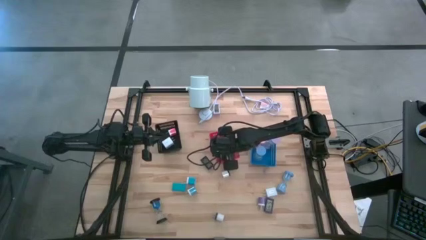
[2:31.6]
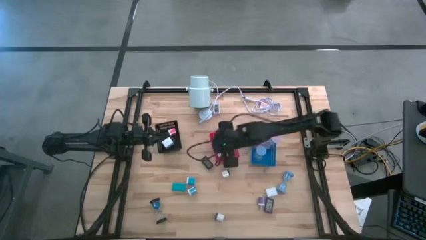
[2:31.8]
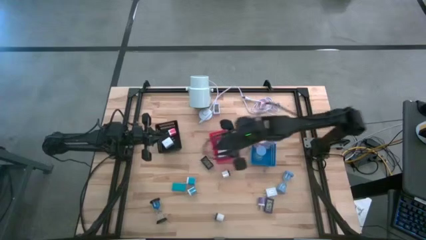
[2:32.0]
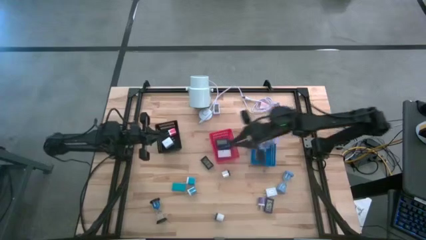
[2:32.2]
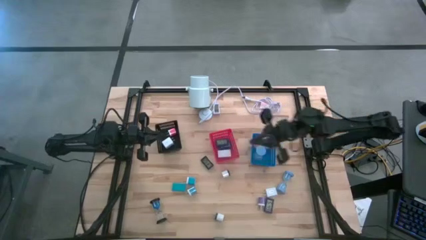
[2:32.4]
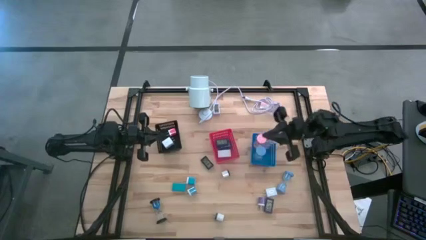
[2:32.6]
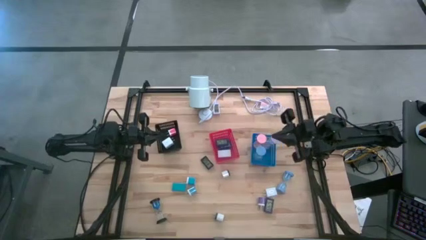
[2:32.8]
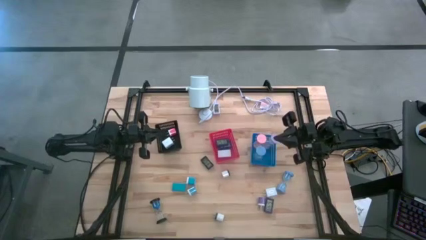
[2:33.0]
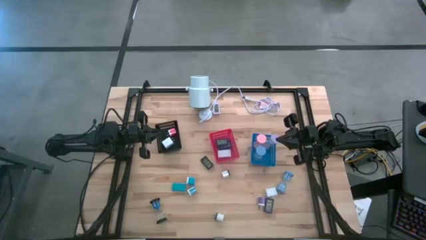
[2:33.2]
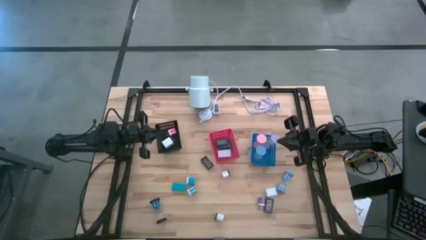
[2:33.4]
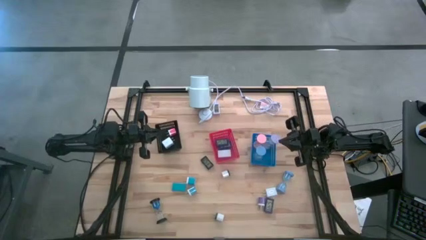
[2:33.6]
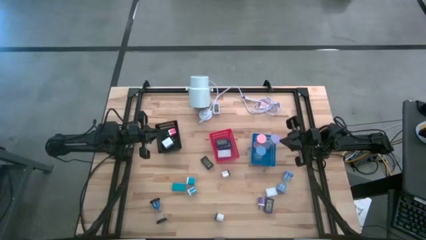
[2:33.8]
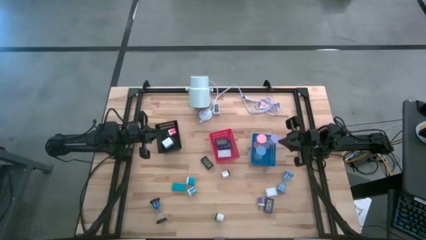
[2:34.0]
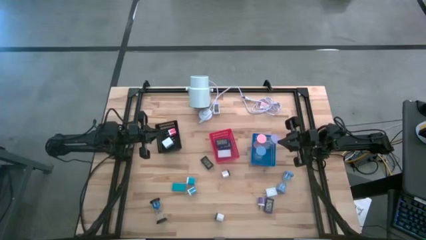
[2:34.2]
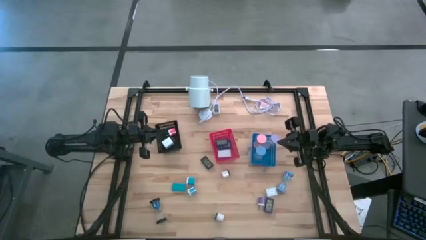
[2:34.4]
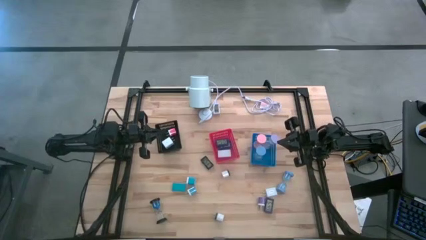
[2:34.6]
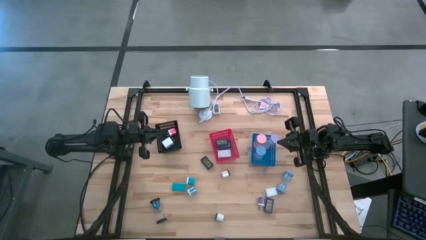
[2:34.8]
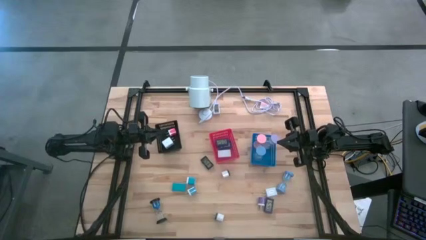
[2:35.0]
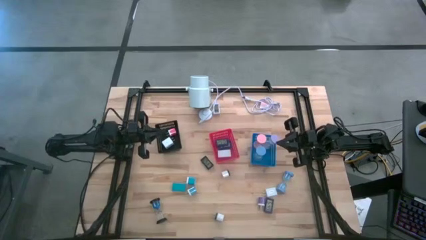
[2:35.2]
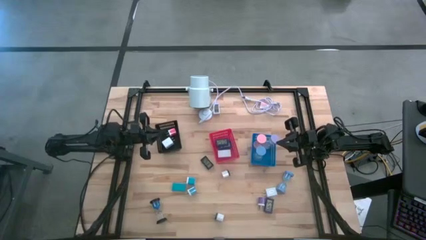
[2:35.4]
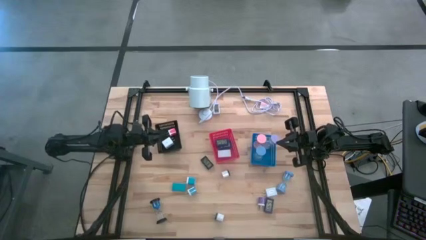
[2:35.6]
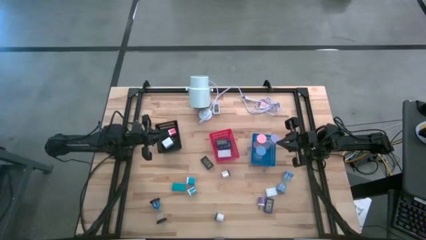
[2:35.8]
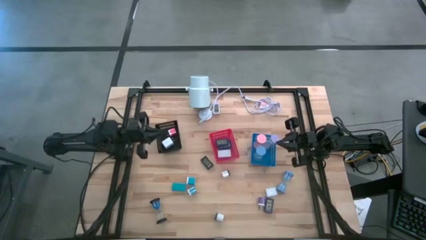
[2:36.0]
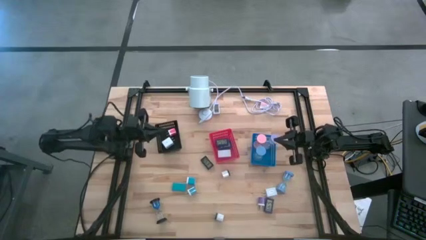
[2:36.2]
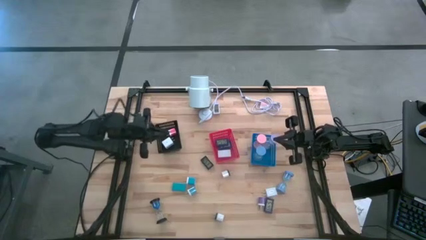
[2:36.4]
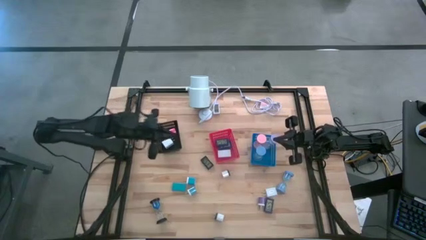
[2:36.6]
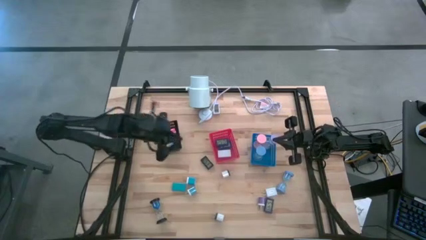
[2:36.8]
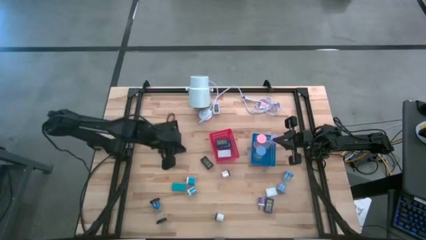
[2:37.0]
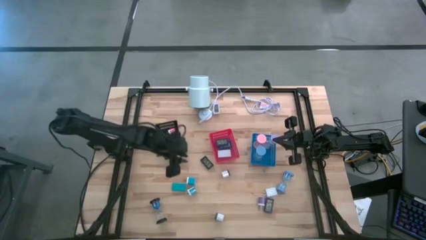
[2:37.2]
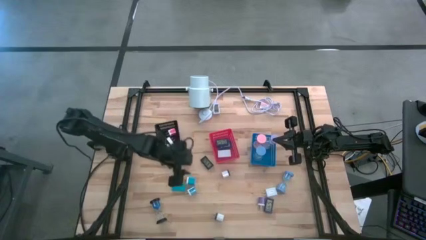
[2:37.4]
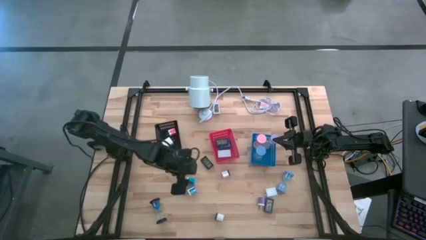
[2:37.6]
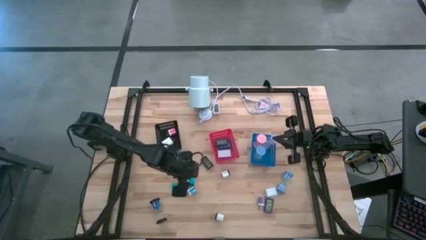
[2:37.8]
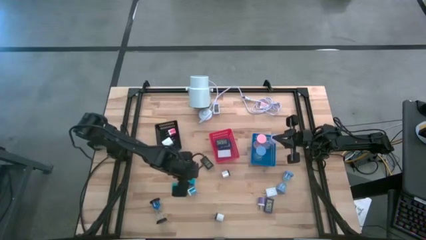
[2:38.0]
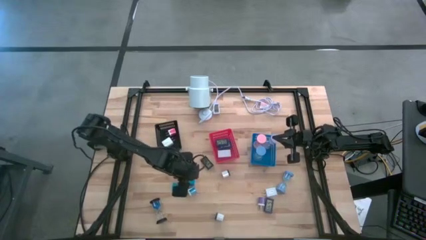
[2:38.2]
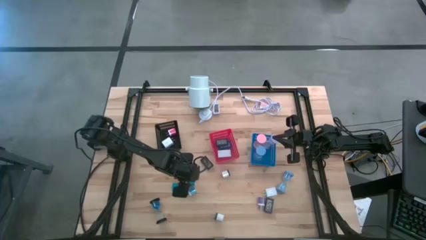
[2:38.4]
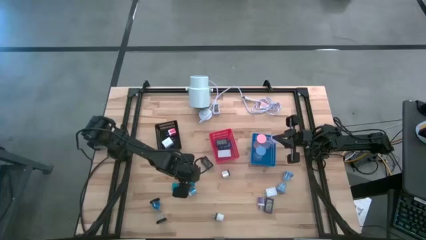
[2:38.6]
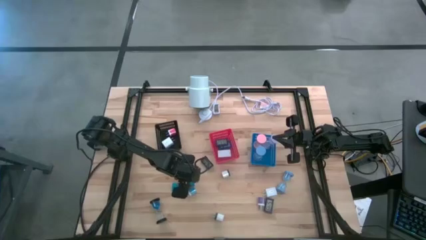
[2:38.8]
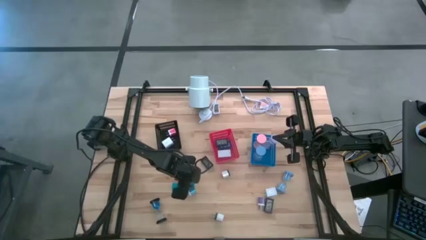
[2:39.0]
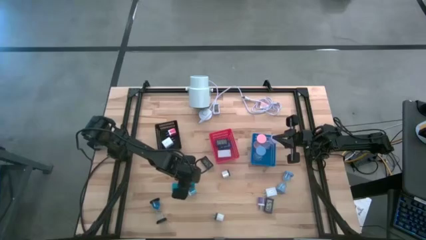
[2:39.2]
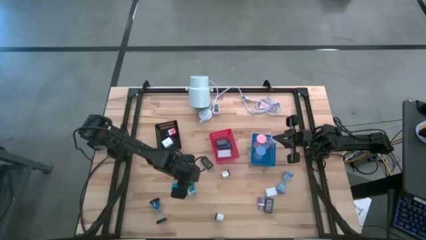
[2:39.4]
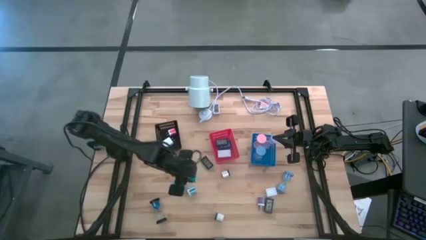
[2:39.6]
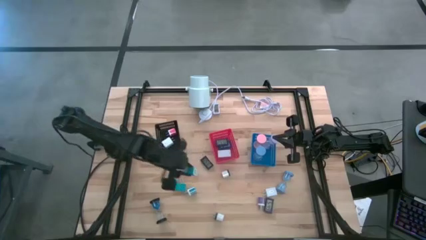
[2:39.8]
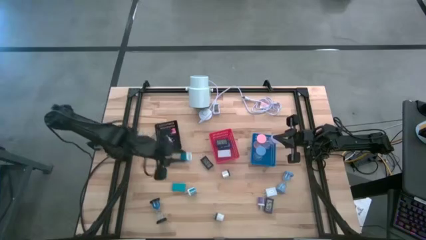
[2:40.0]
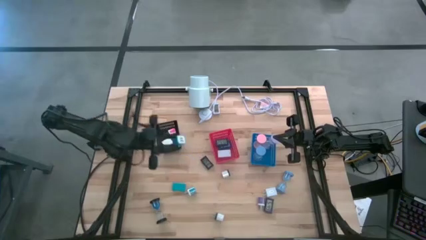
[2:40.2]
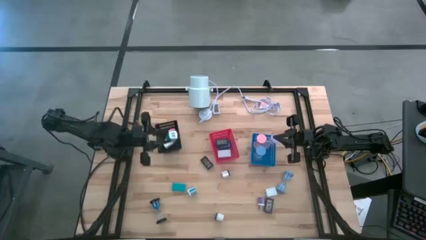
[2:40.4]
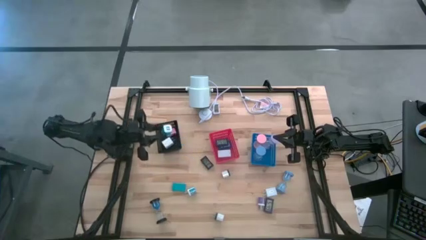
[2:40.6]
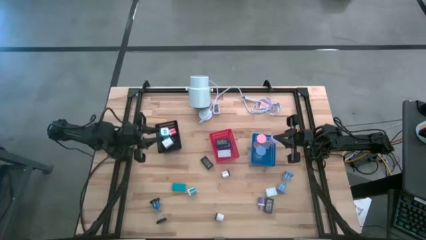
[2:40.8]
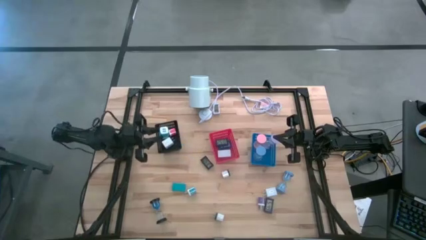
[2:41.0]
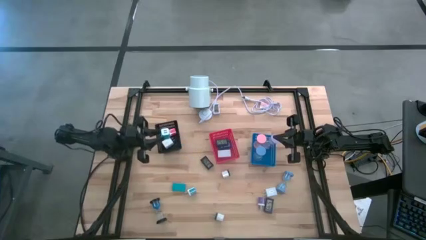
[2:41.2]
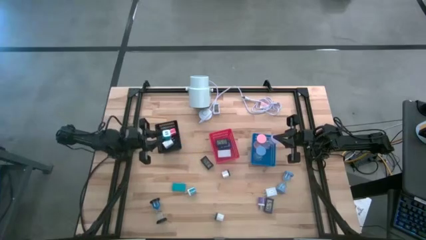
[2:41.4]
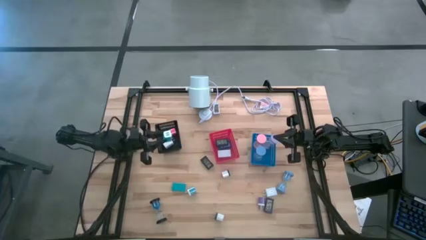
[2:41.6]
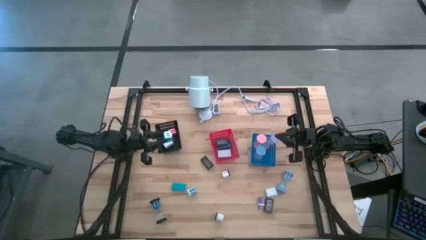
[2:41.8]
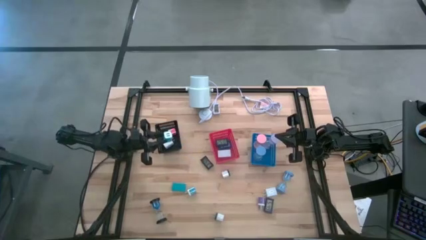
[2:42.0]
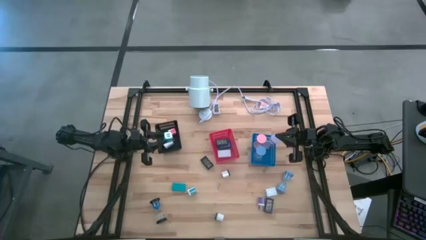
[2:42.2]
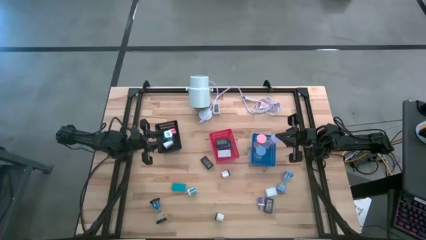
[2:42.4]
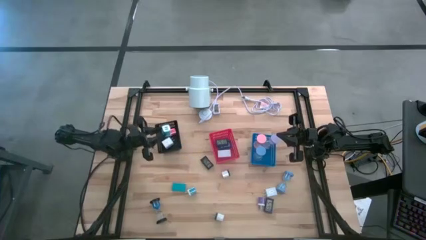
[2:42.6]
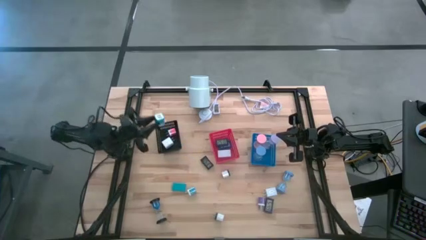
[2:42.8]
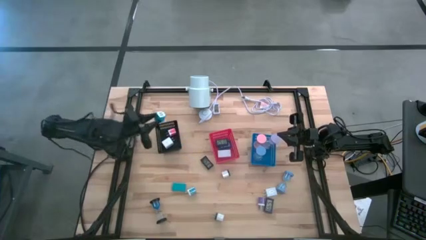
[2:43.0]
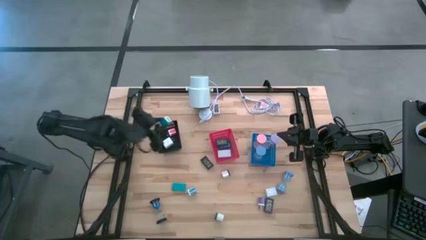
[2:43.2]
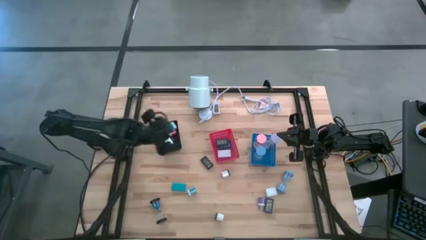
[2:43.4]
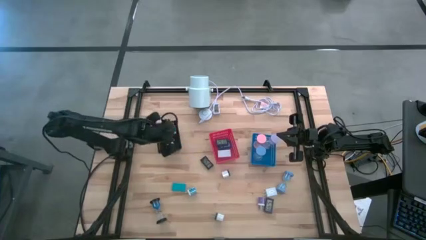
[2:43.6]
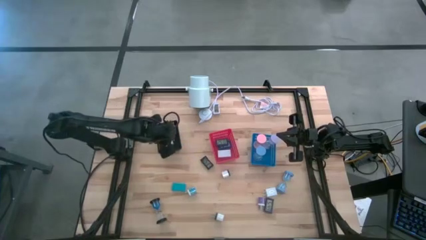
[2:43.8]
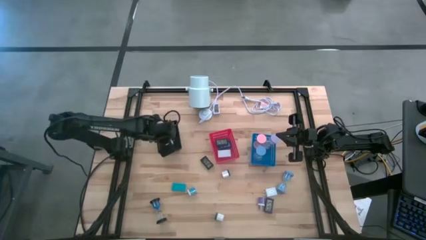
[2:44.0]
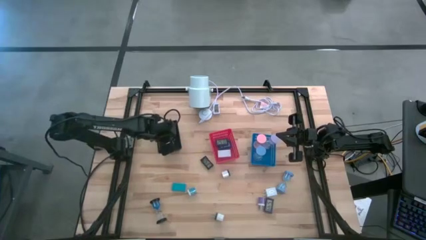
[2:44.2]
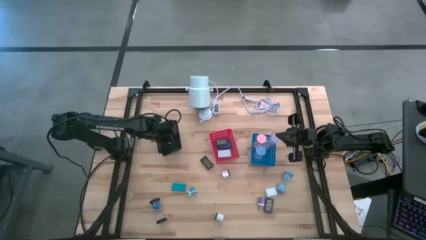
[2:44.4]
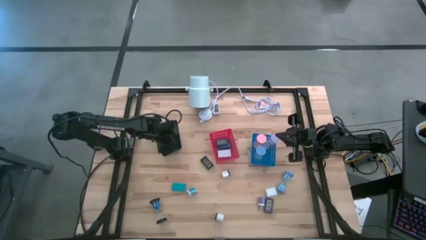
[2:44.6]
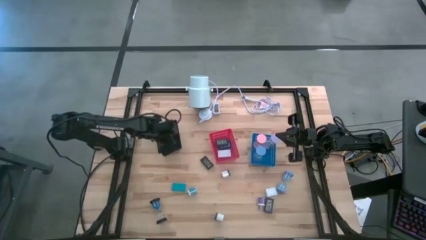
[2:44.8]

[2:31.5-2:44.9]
Task: Pick & Place Office items
Put the top blue charger adapter into the black bin

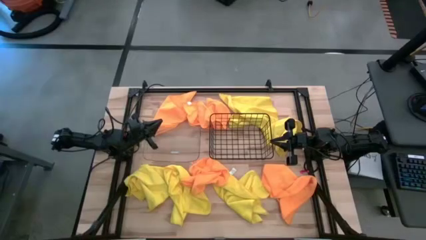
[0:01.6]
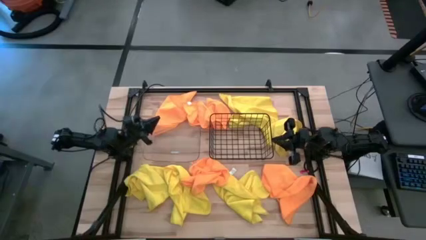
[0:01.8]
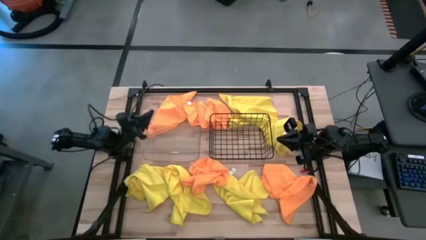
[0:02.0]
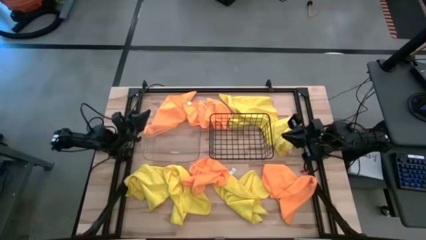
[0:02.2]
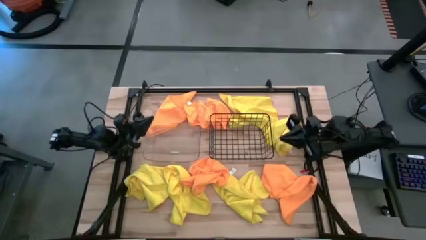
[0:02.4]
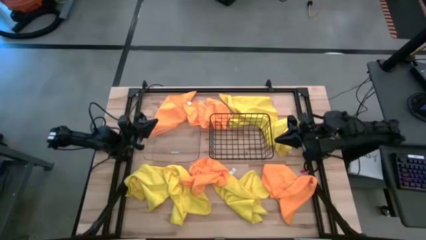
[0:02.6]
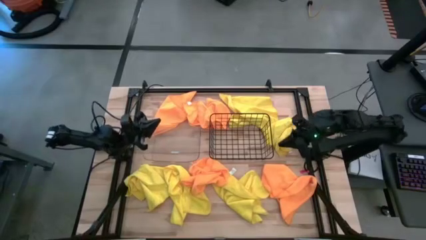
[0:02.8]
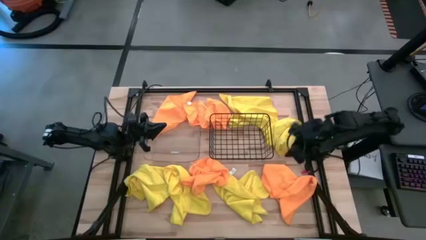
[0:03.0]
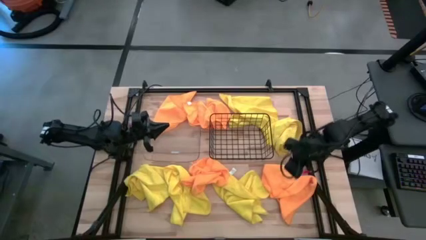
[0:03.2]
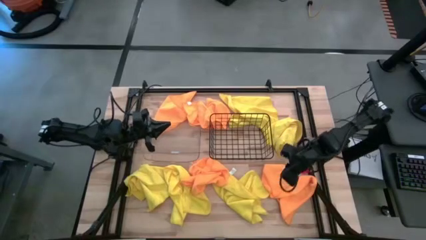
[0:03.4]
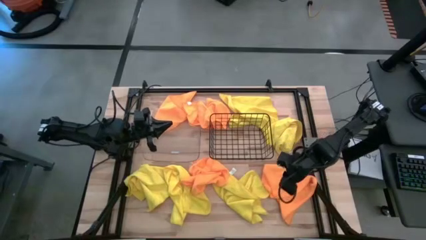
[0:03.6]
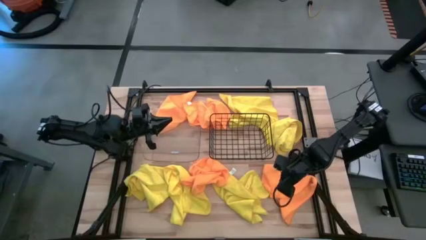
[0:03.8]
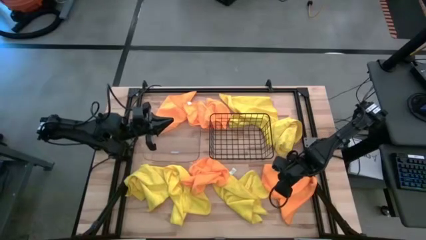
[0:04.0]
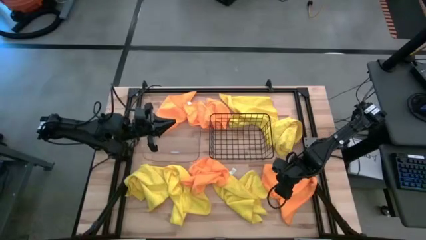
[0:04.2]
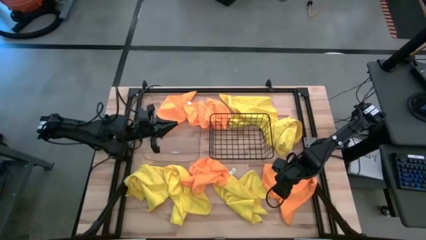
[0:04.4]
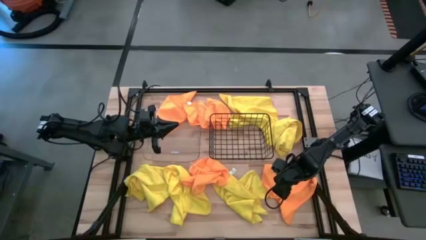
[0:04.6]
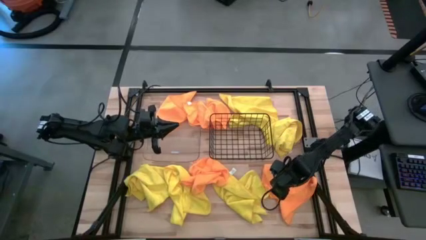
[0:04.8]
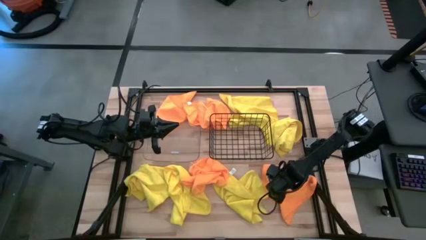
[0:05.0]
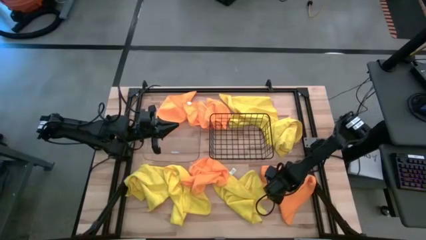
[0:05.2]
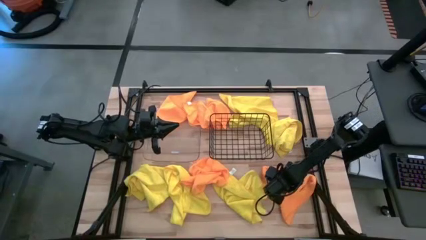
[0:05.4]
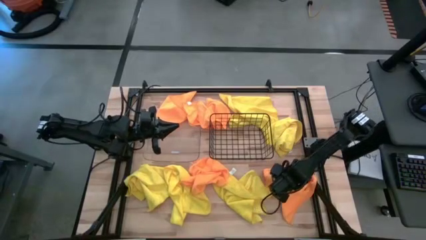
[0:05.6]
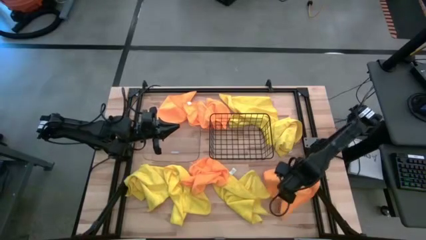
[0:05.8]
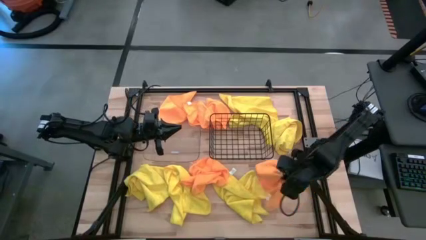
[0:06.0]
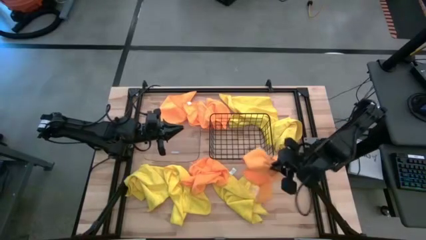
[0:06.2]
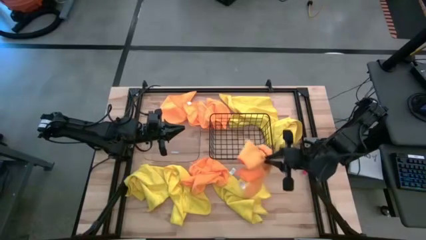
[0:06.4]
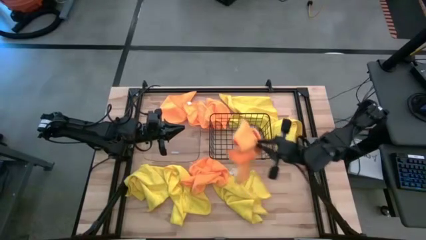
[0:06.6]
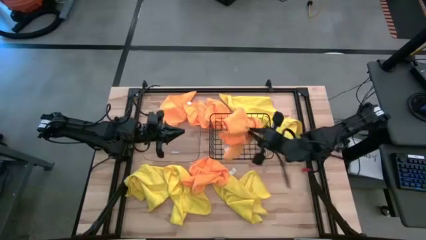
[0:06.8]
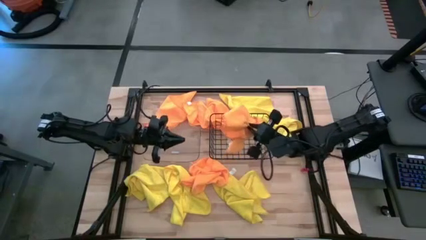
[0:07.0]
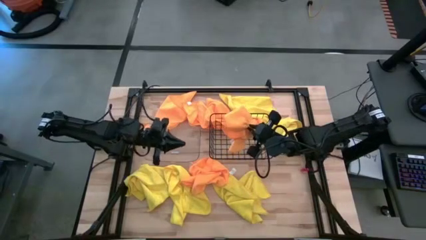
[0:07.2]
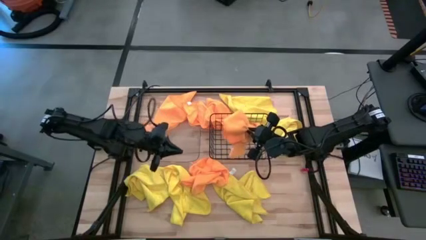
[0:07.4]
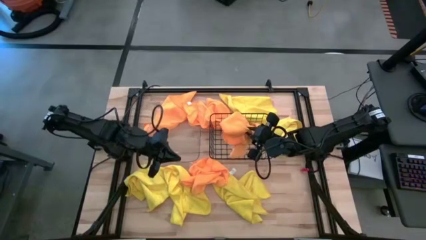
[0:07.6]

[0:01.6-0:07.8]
Task: Sort microfiber towel by color & place in baskets
Put the orange towel into the black wire basket
